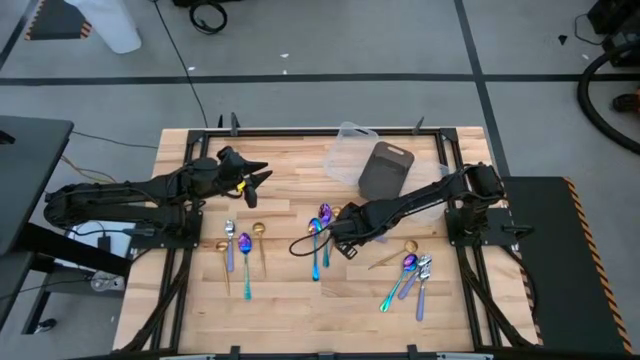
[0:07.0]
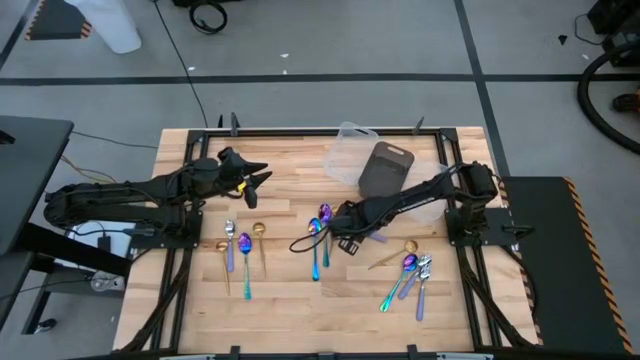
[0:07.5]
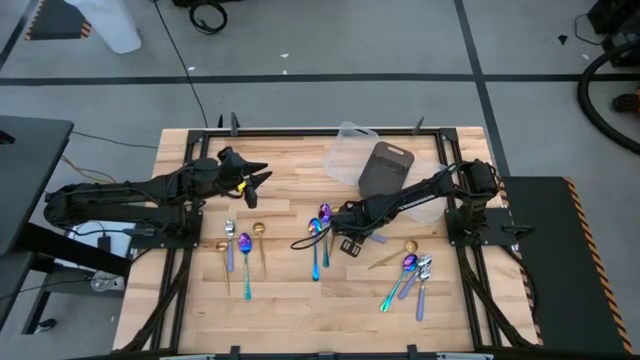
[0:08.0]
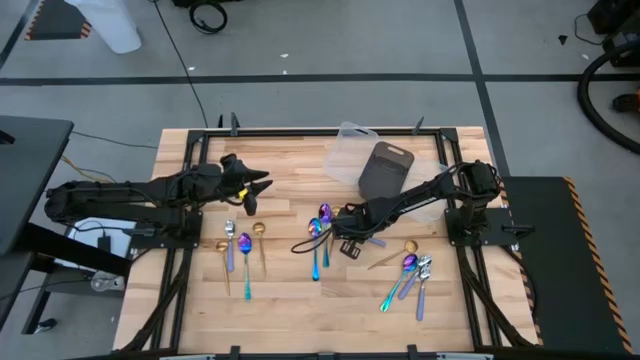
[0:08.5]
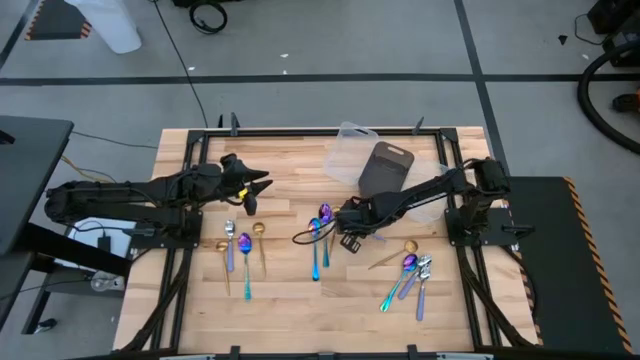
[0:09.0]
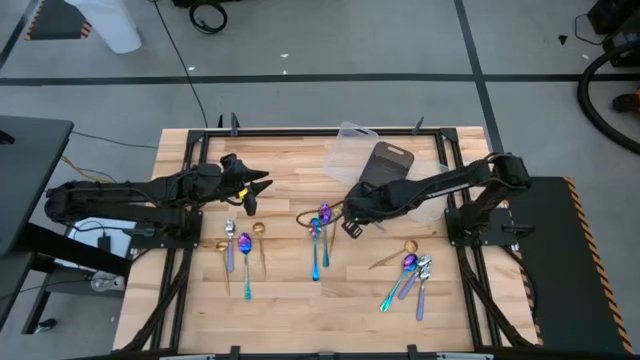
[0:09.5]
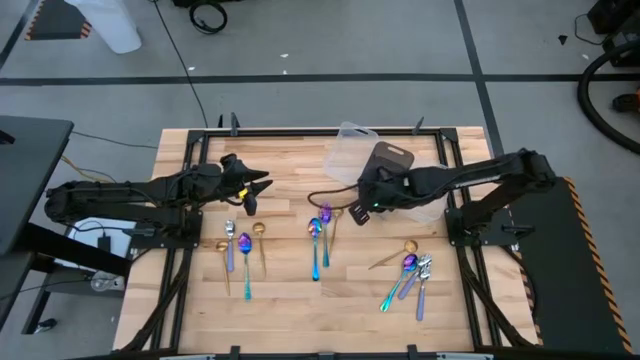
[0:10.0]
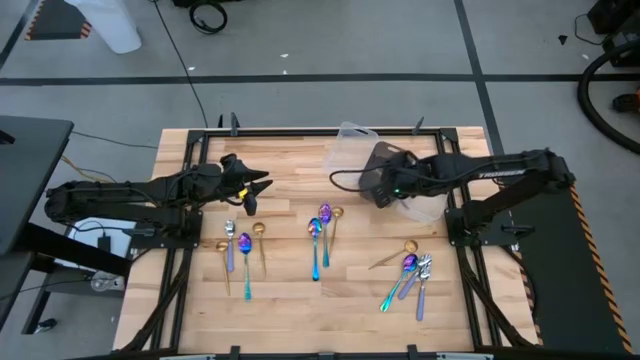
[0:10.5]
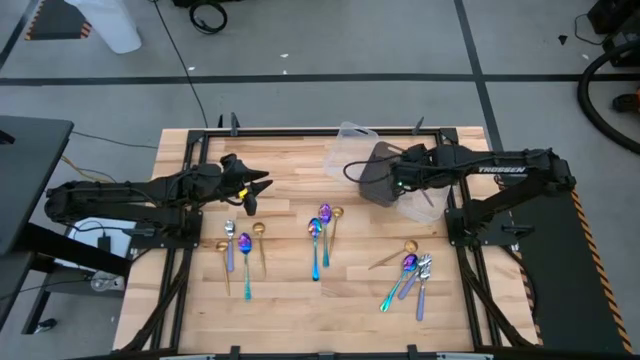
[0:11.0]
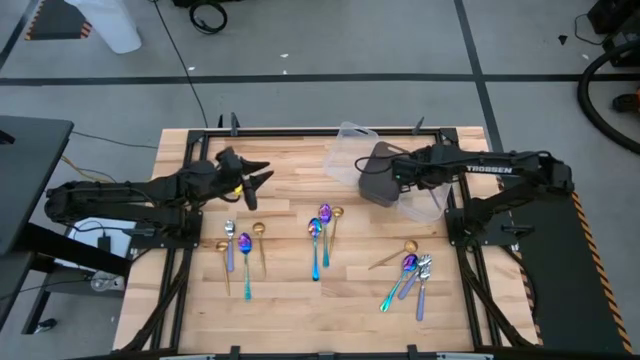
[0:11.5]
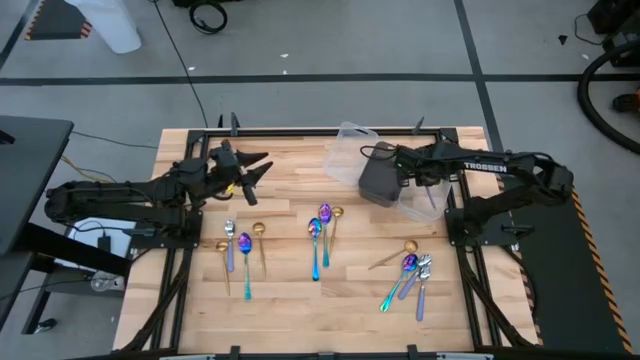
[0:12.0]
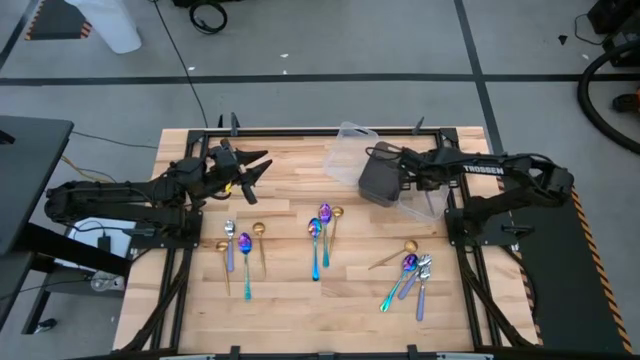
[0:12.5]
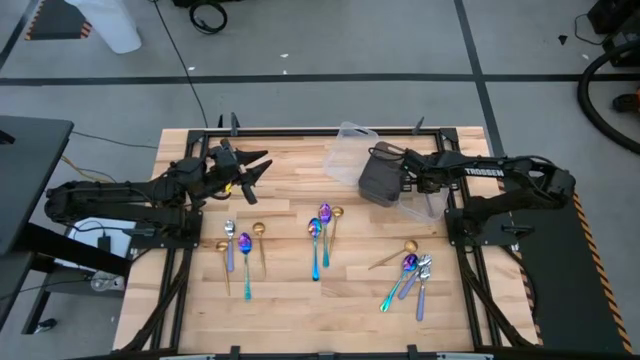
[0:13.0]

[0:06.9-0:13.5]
Task: Sort silverware by color (type)
Put the purple spoon into the right transparent bin

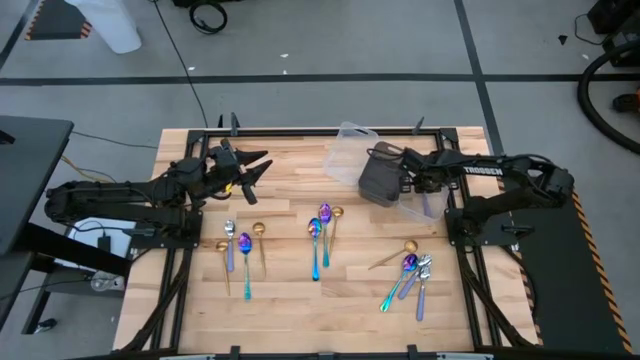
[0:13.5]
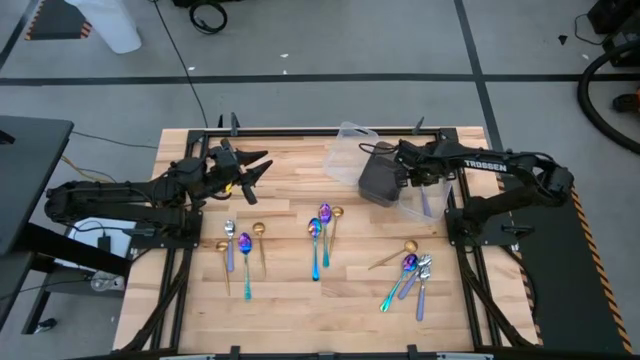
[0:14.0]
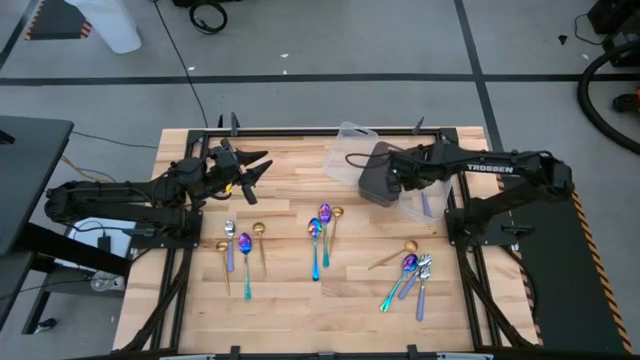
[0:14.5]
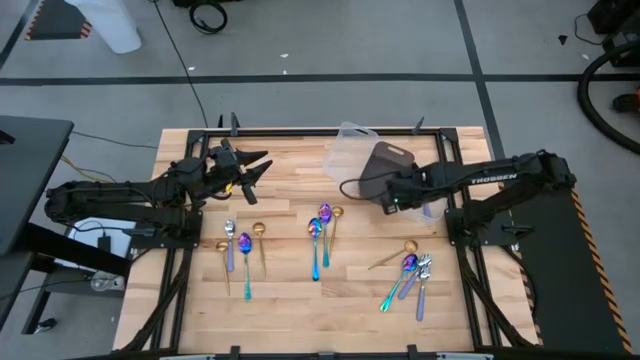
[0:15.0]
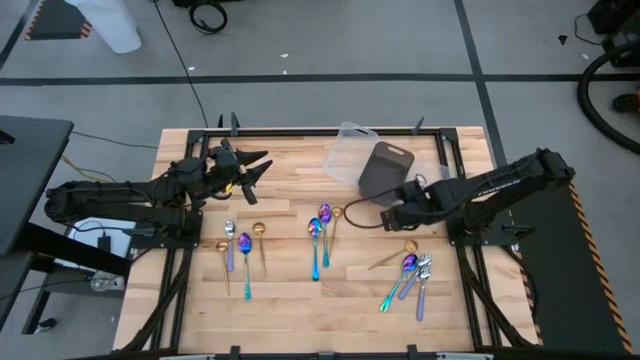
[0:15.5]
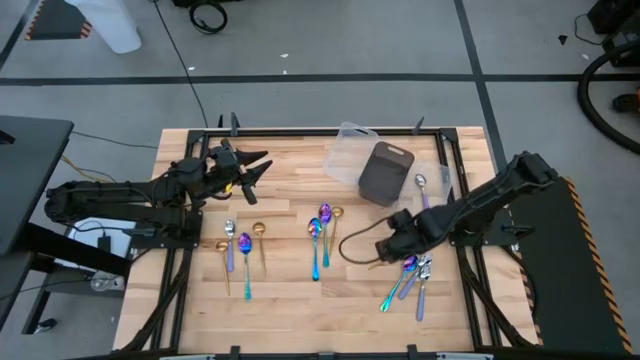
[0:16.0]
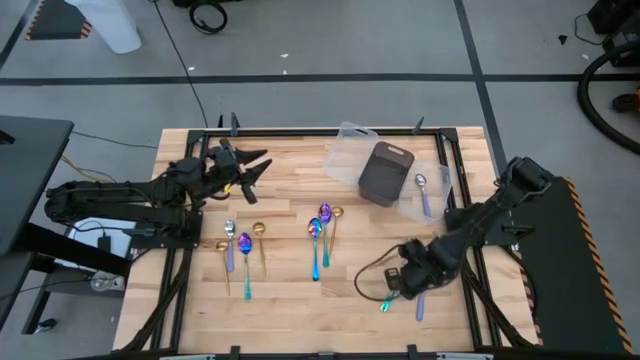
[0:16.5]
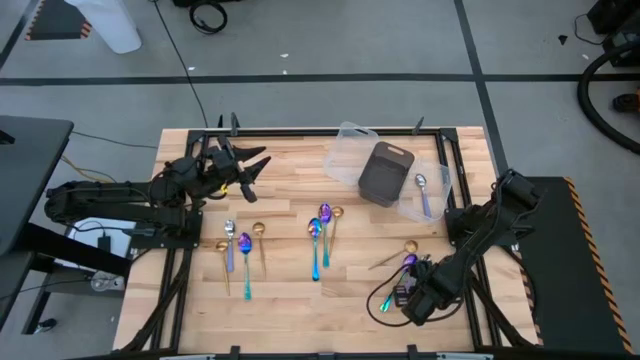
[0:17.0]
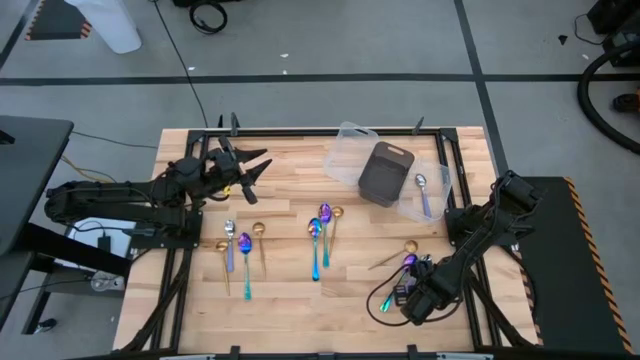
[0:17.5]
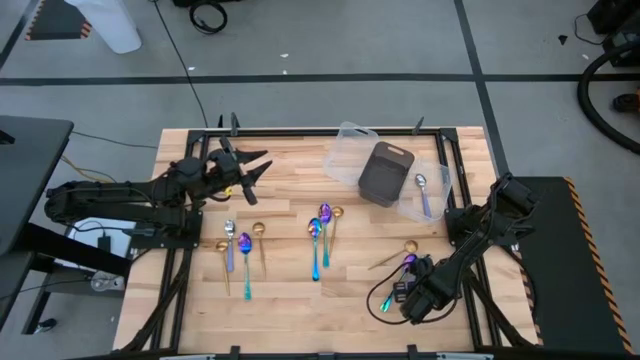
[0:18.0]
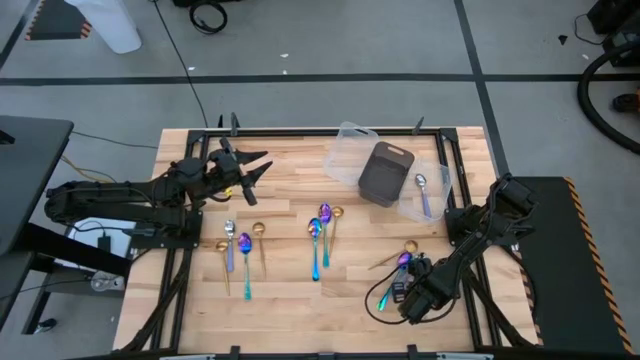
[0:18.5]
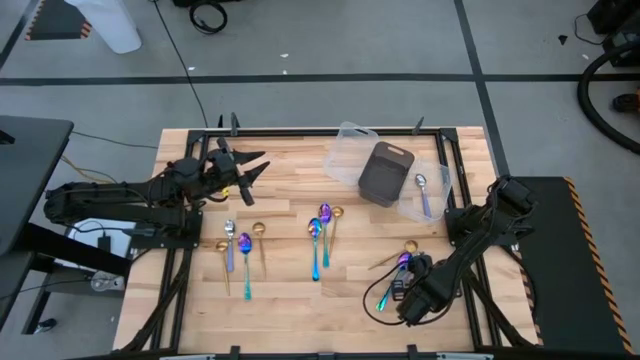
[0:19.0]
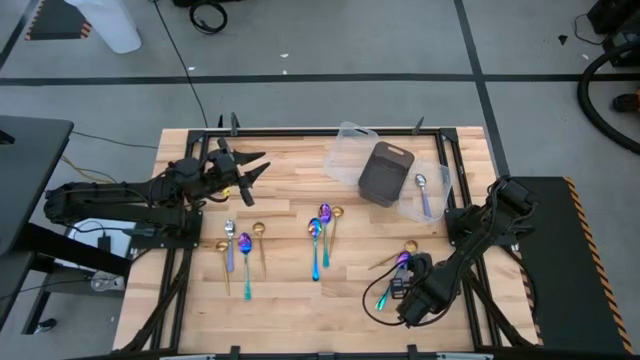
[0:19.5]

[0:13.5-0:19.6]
Put the purple spoon into the right transparent bin

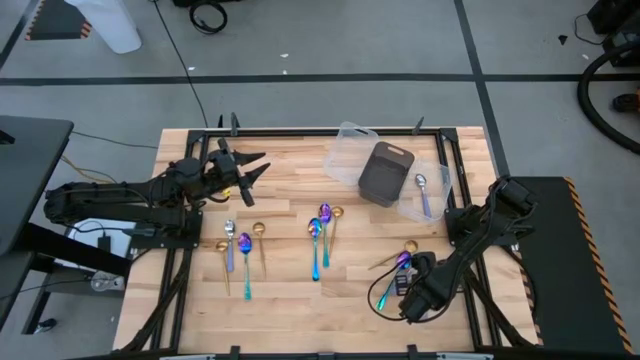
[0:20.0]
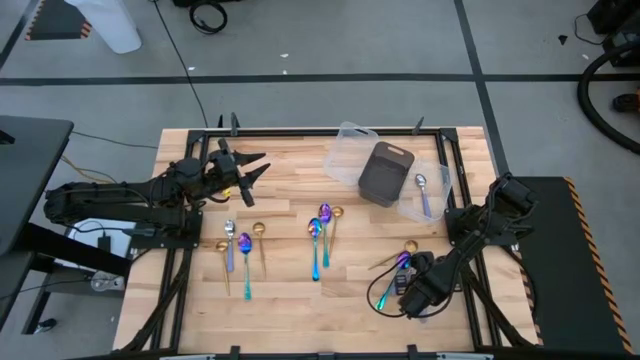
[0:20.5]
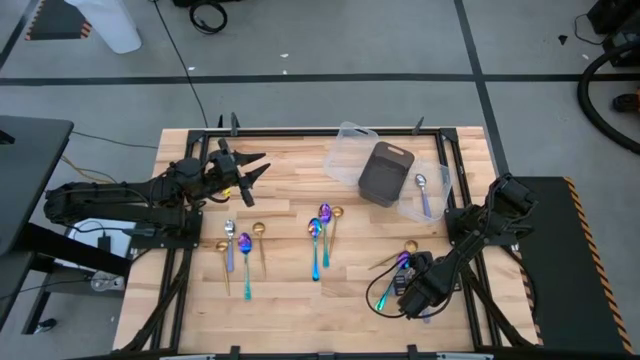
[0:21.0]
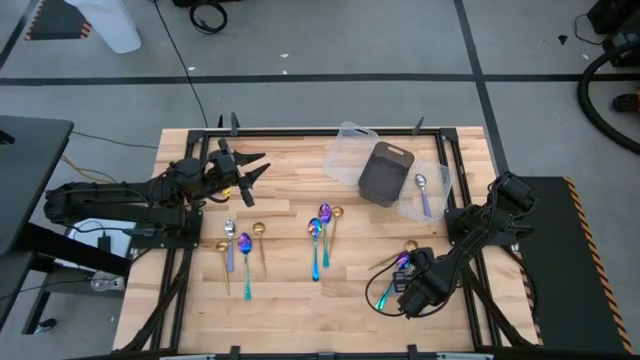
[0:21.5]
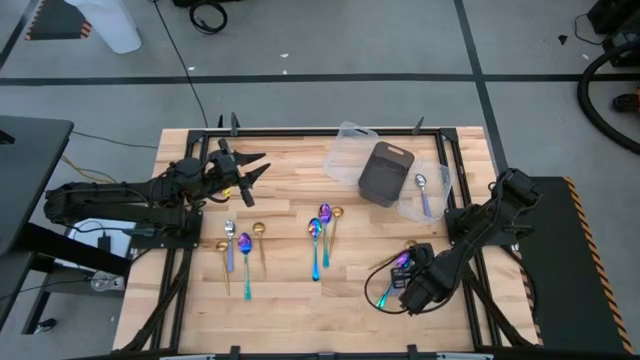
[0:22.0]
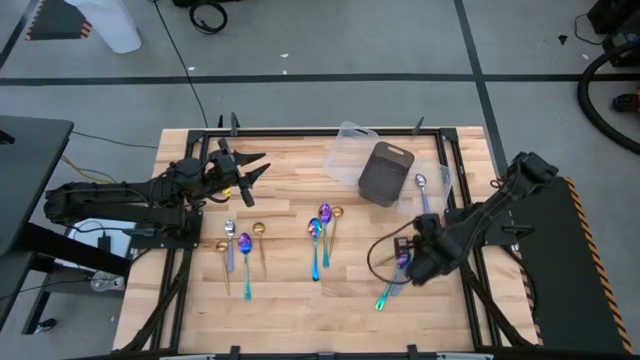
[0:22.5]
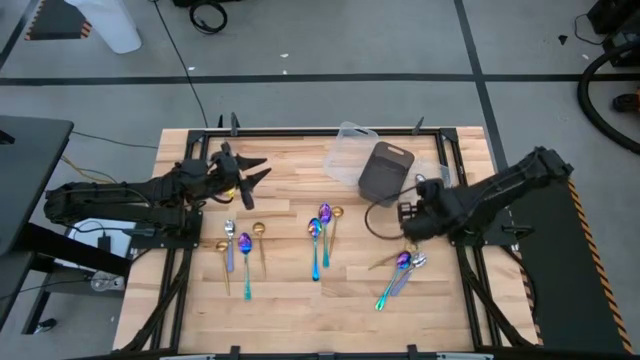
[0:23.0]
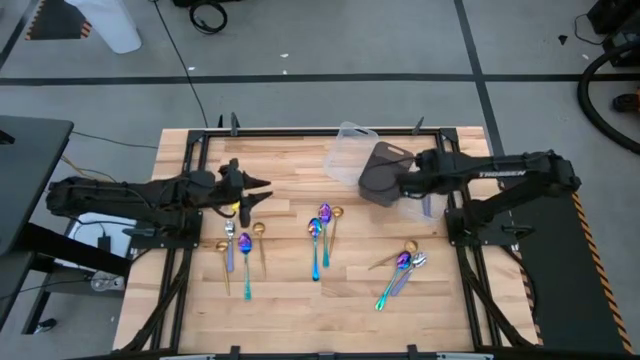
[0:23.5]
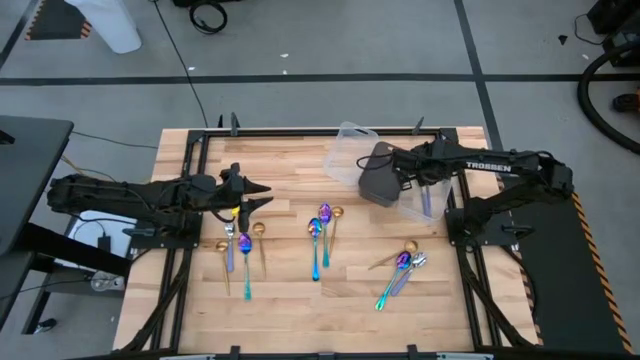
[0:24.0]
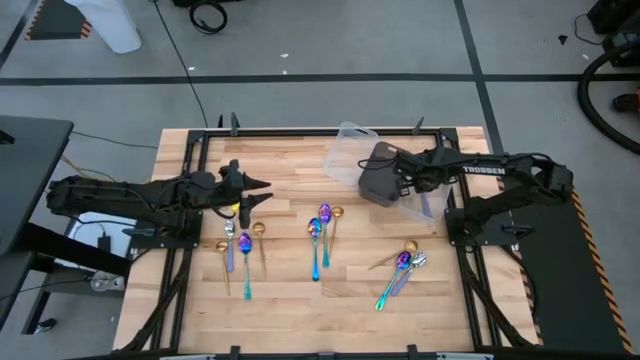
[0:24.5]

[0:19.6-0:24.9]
Put the purple spoon into the right transparent bin

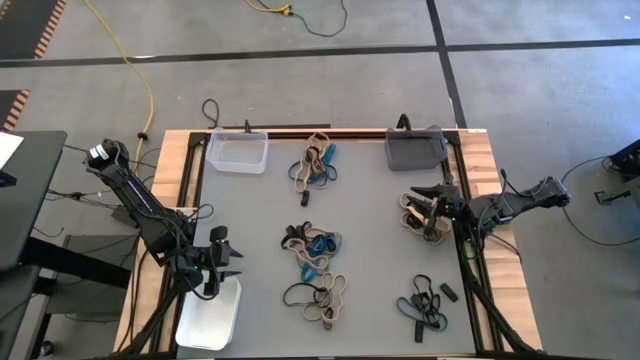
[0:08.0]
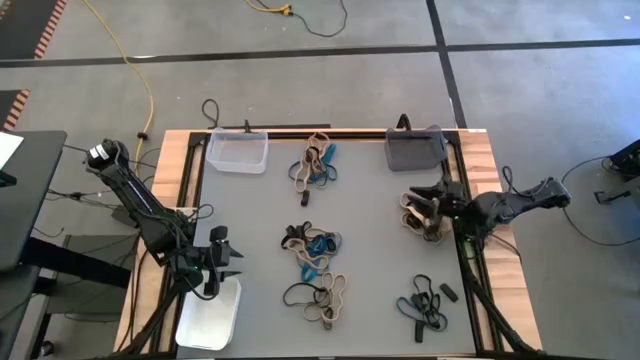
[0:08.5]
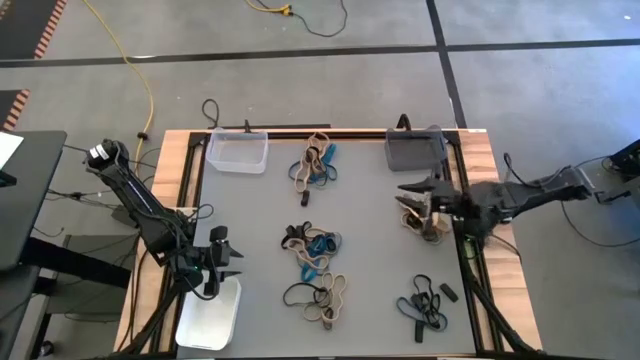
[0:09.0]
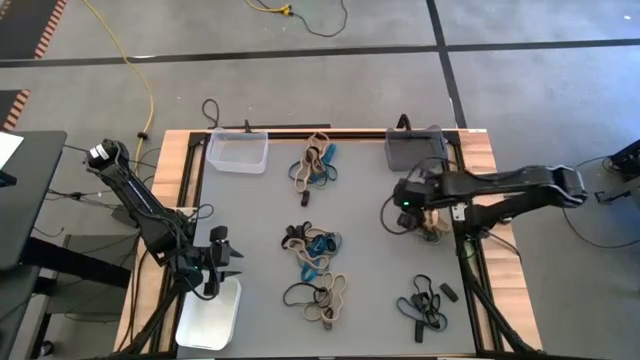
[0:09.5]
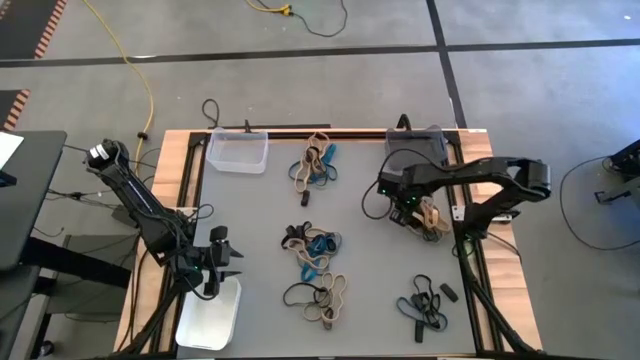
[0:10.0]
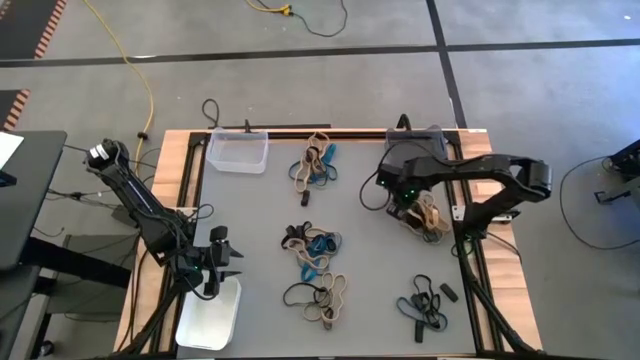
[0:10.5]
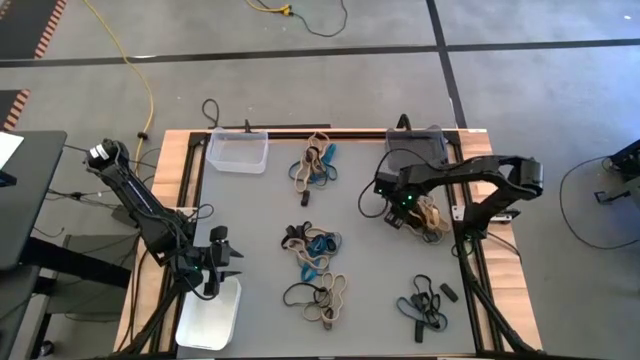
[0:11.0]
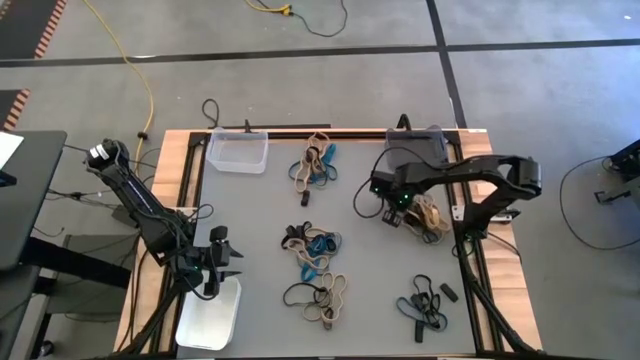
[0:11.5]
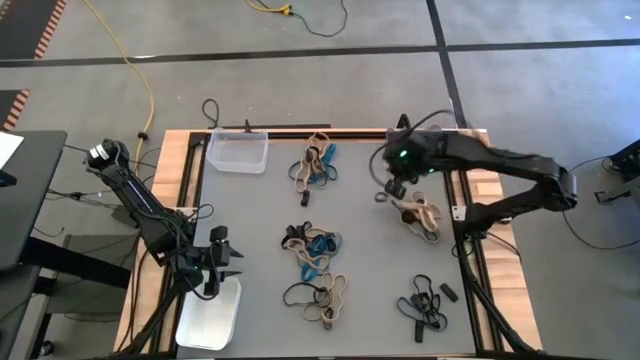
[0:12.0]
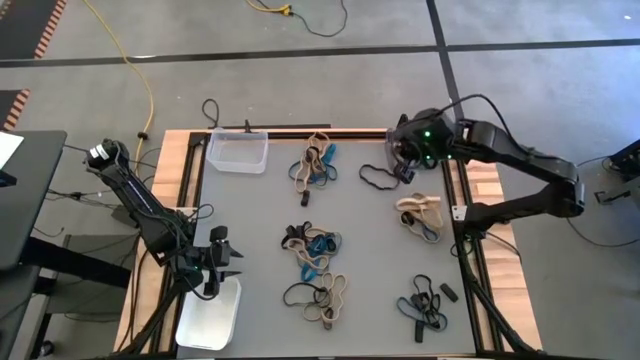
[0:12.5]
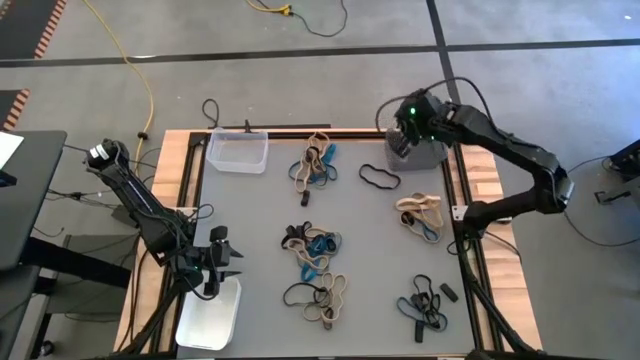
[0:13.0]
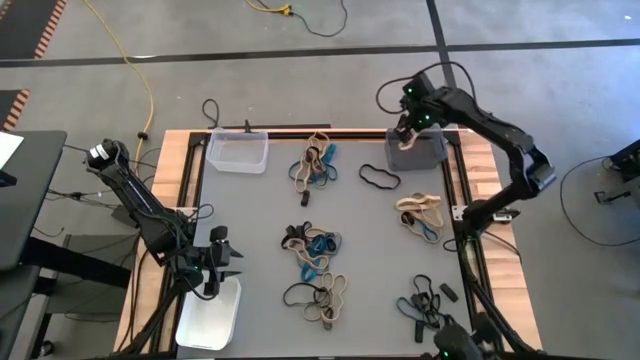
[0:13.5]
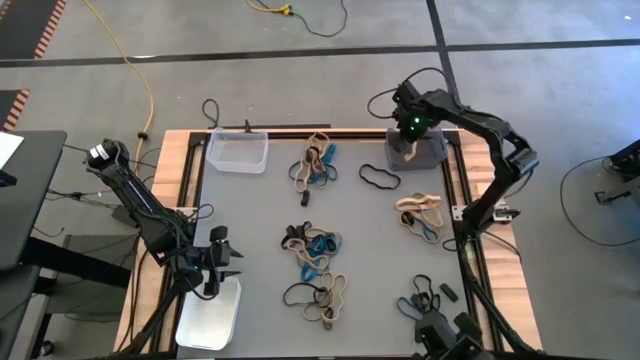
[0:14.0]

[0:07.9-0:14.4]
Task: Sort rubber bands into baskets
Put the white rubber band into the black transparent bin
